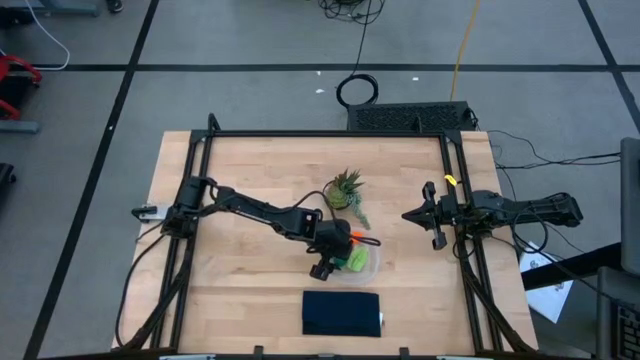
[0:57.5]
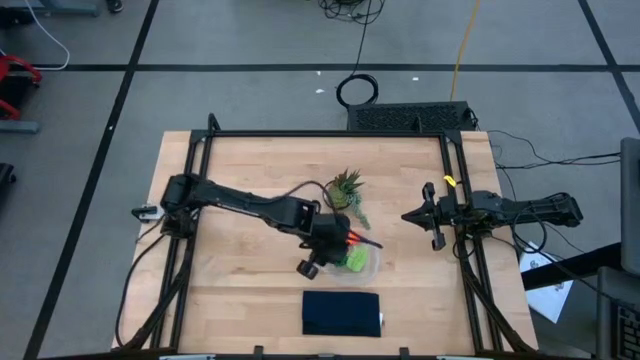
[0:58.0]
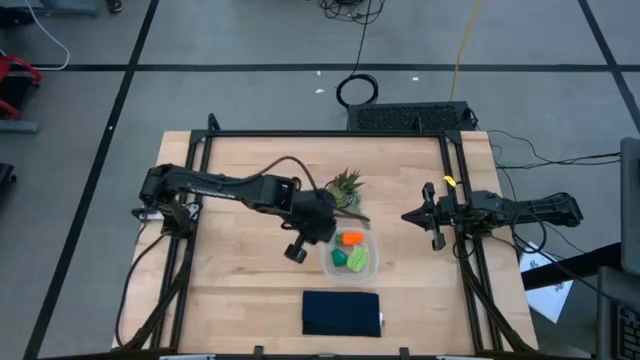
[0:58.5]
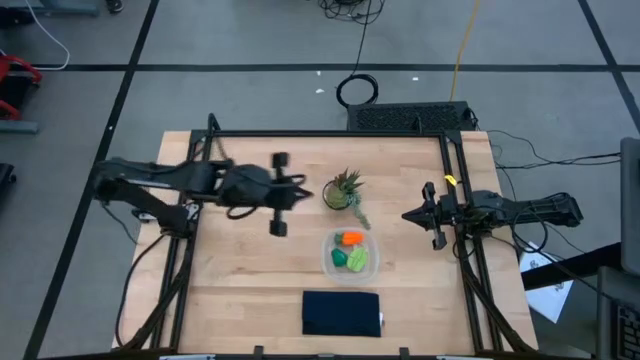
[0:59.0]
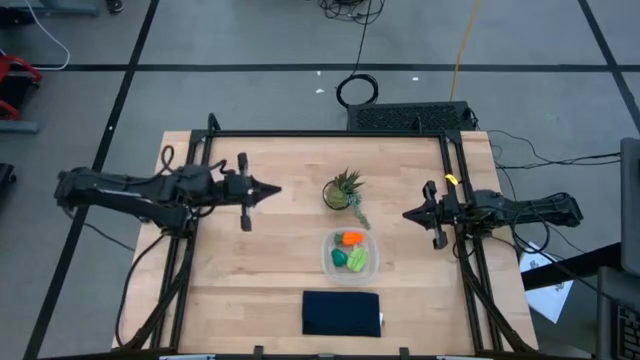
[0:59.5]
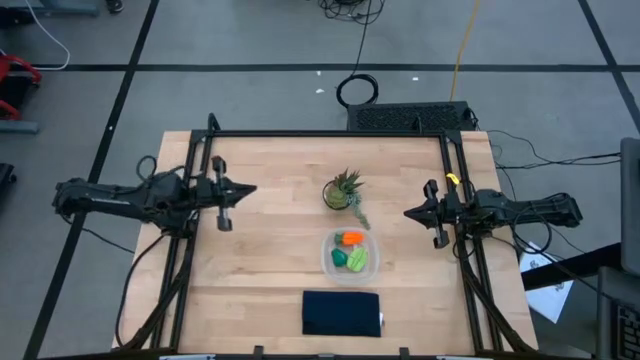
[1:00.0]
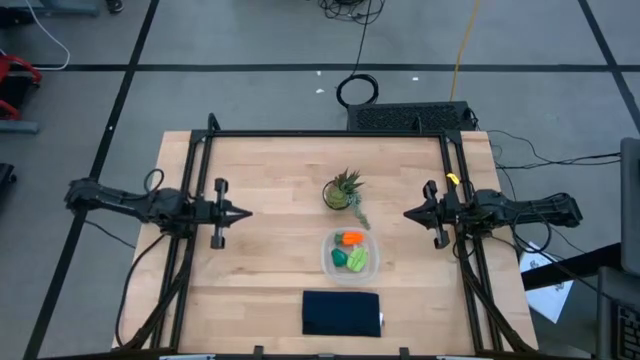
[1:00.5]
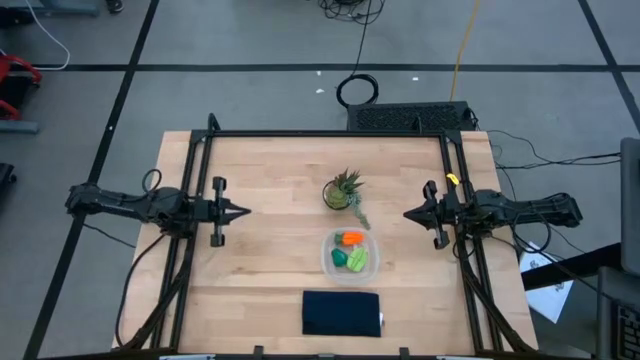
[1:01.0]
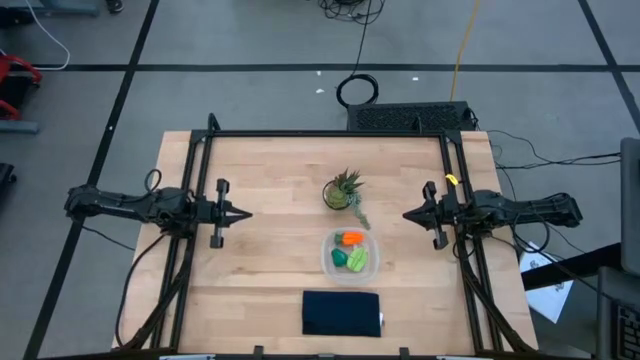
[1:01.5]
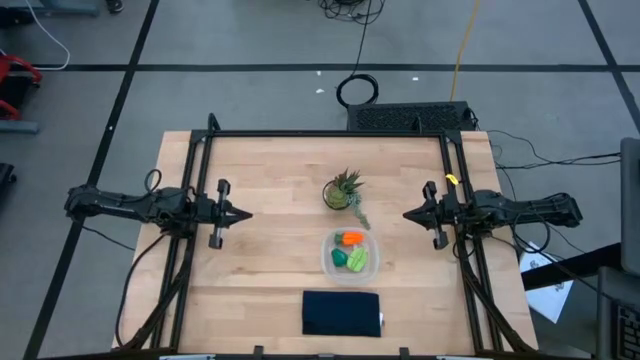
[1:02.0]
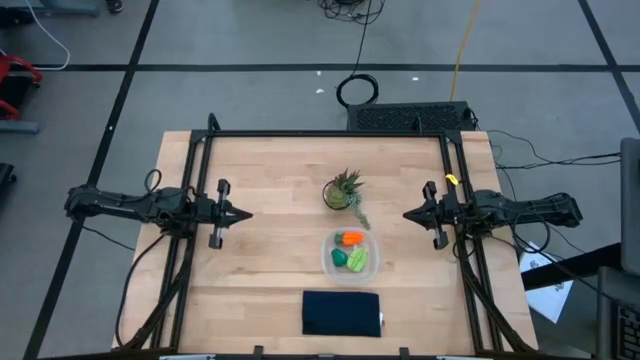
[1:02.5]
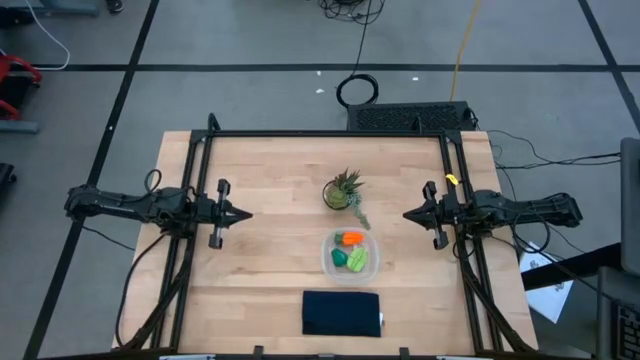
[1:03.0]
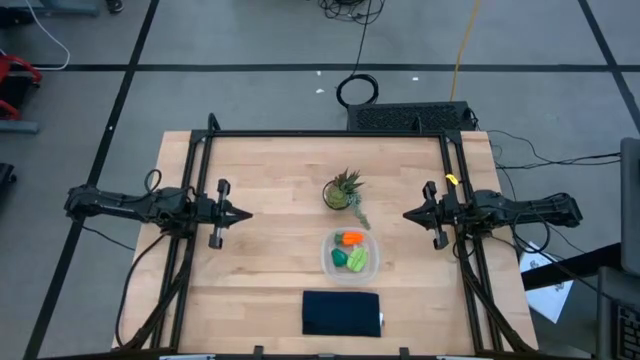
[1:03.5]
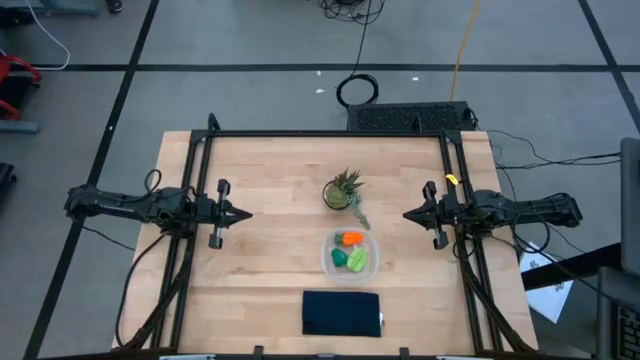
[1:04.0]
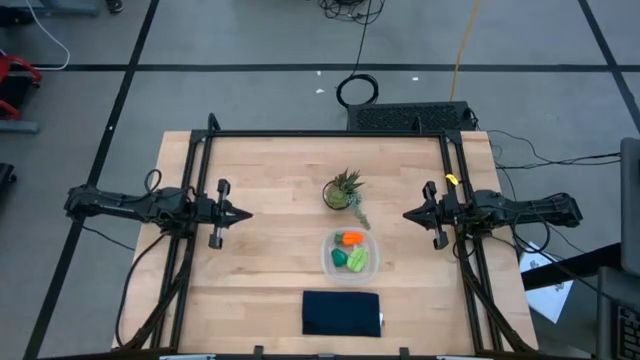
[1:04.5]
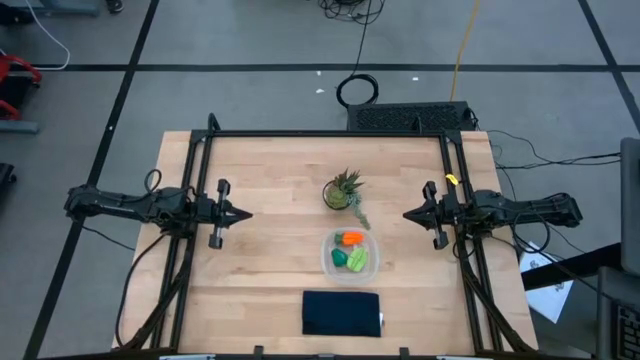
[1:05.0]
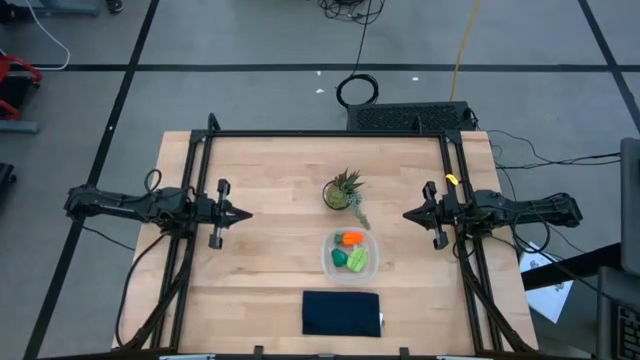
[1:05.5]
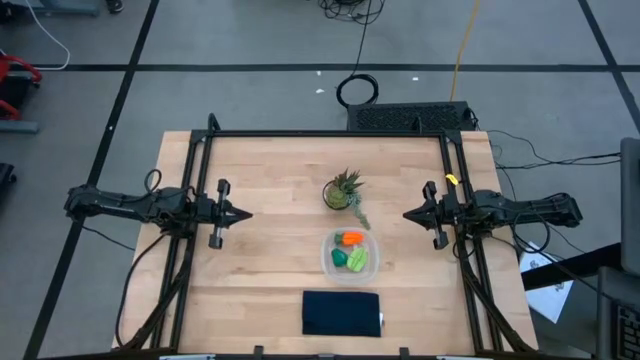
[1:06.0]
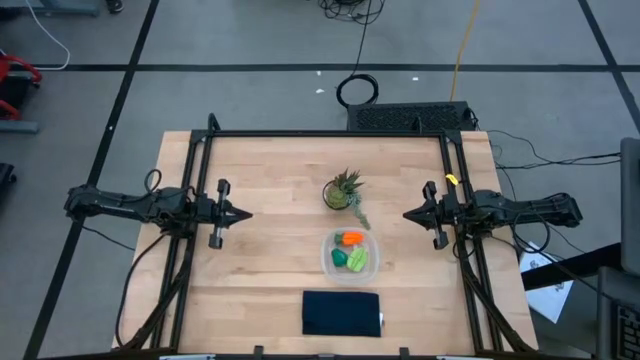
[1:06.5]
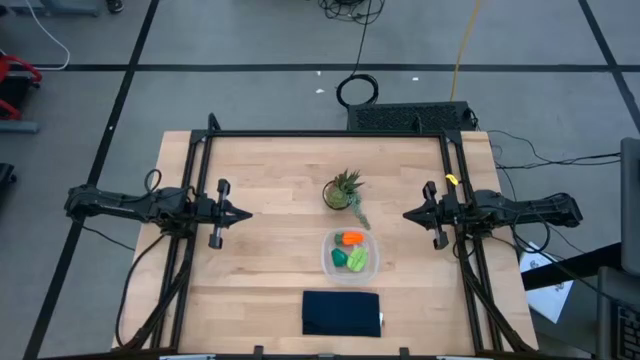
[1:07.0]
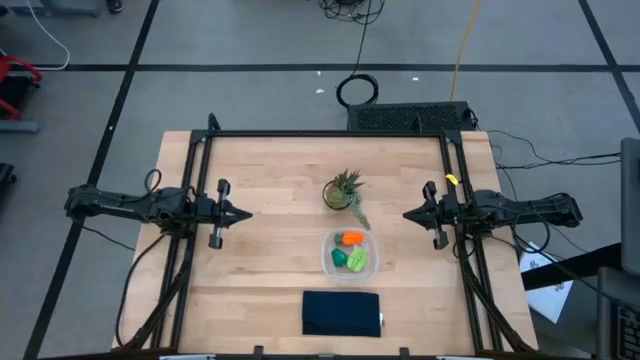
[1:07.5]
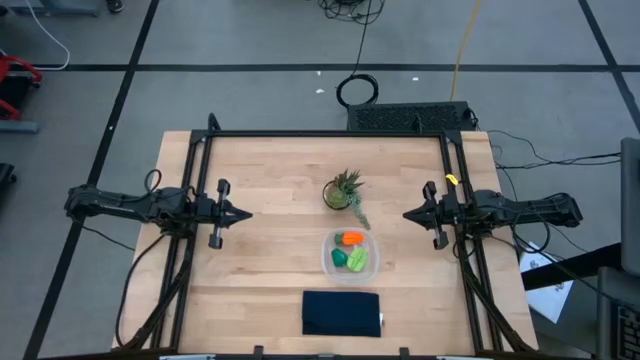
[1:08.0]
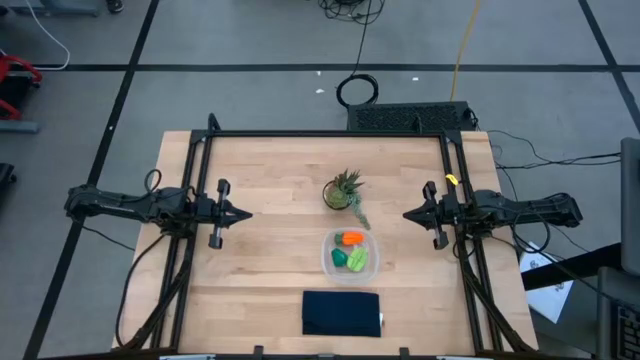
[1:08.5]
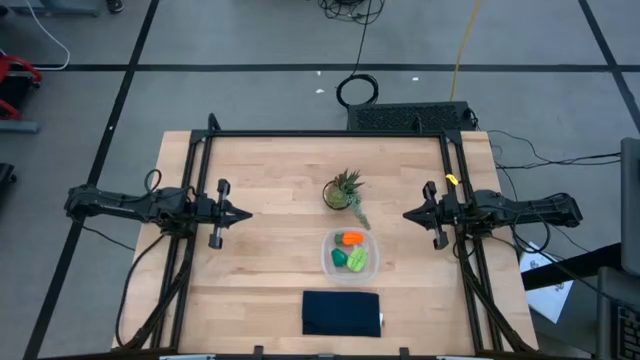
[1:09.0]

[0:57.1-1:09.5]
Task: Pick and placing Produce into tupperware
Return to Home Position

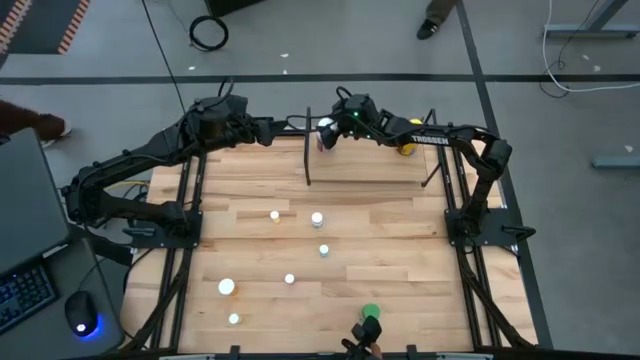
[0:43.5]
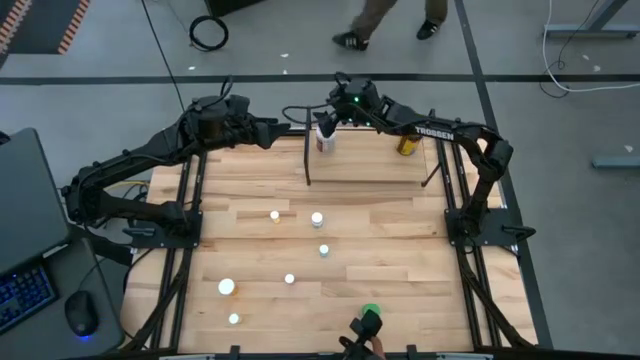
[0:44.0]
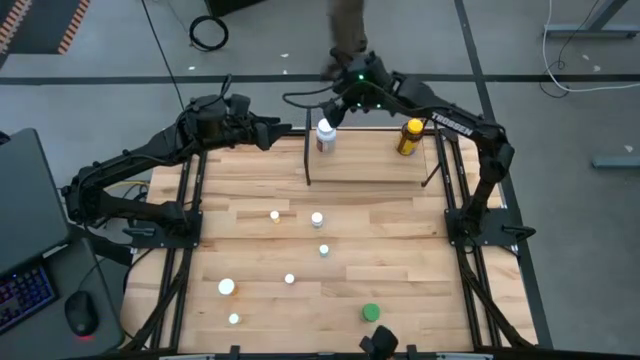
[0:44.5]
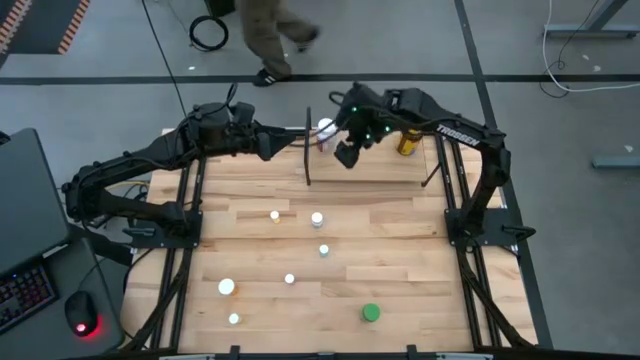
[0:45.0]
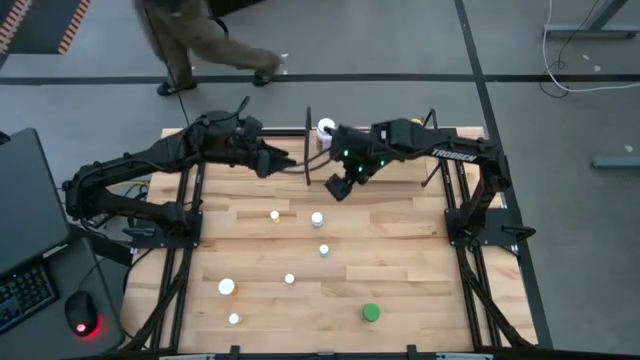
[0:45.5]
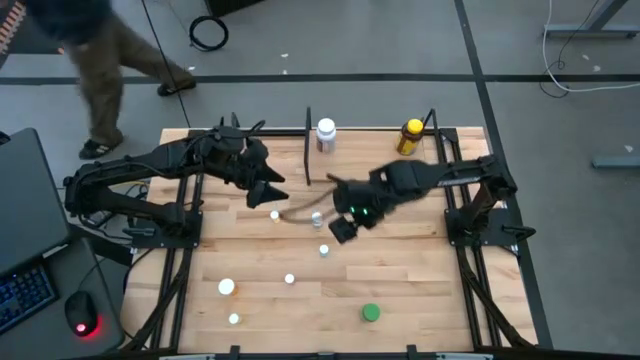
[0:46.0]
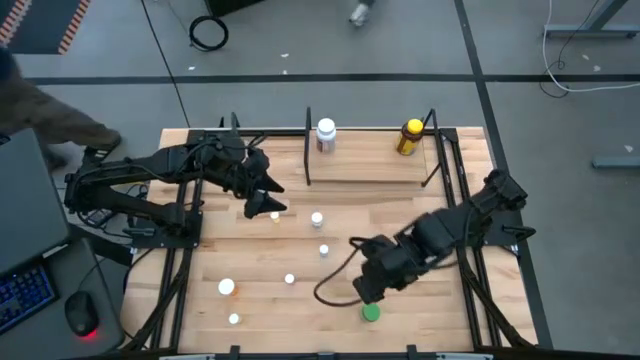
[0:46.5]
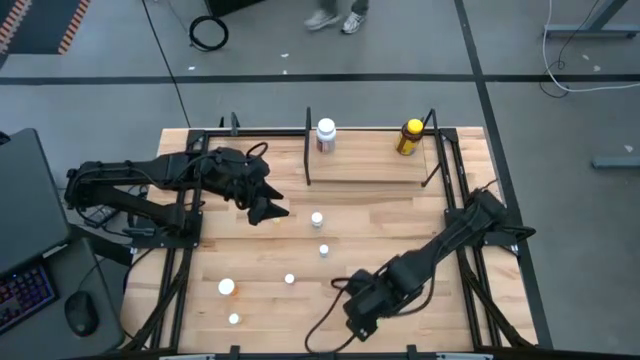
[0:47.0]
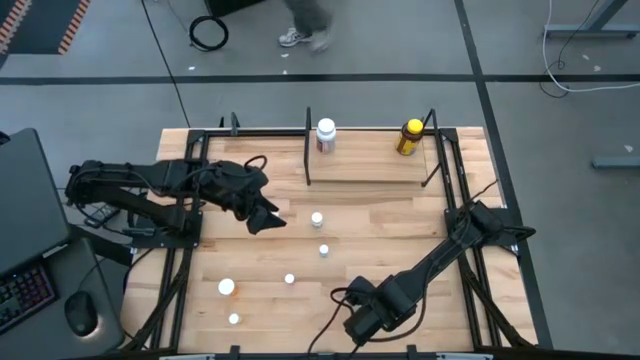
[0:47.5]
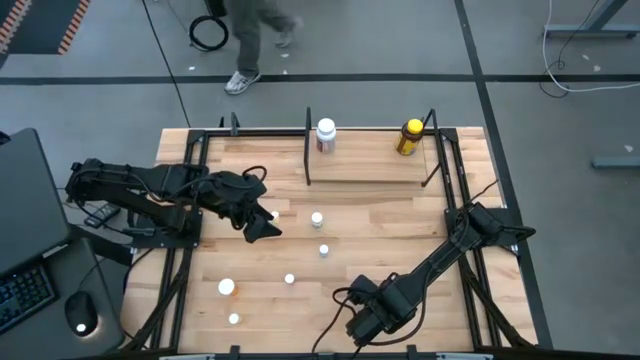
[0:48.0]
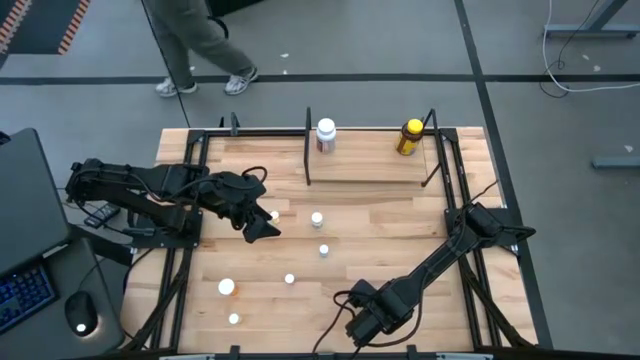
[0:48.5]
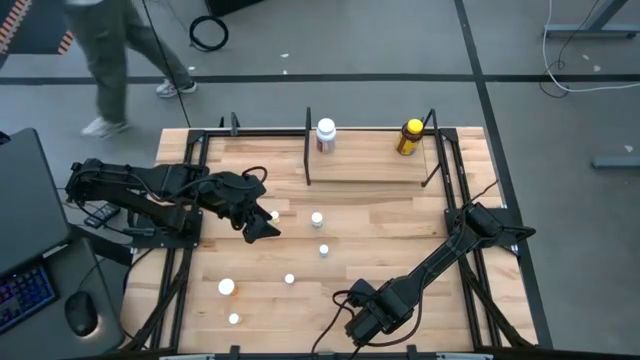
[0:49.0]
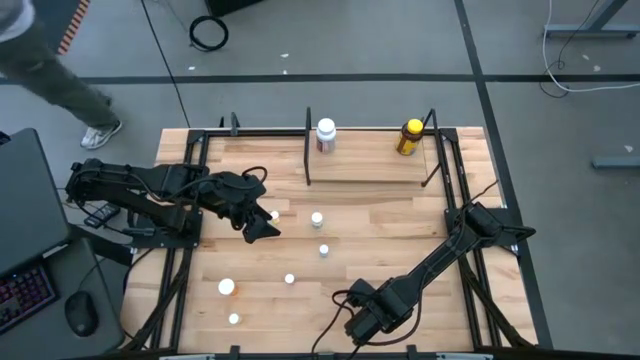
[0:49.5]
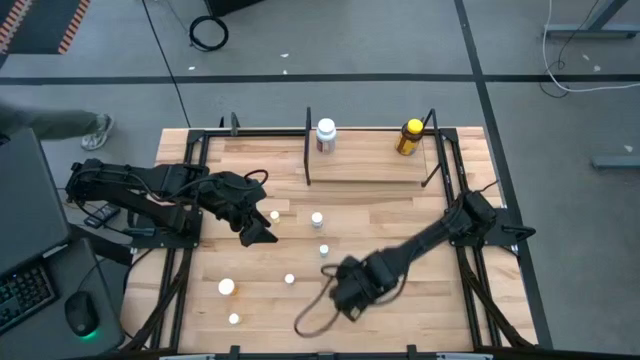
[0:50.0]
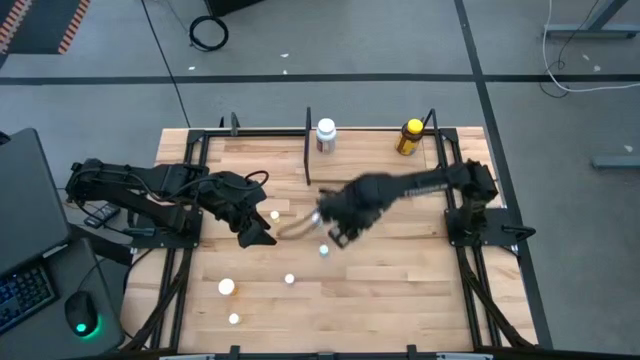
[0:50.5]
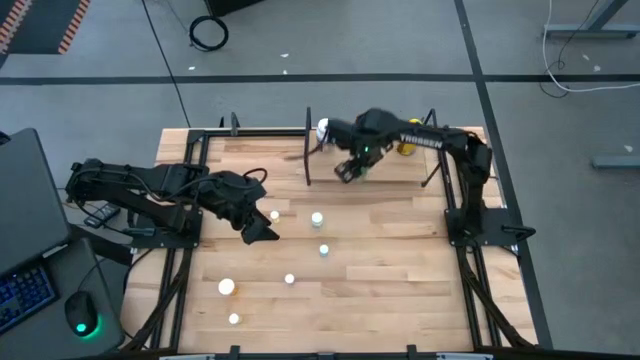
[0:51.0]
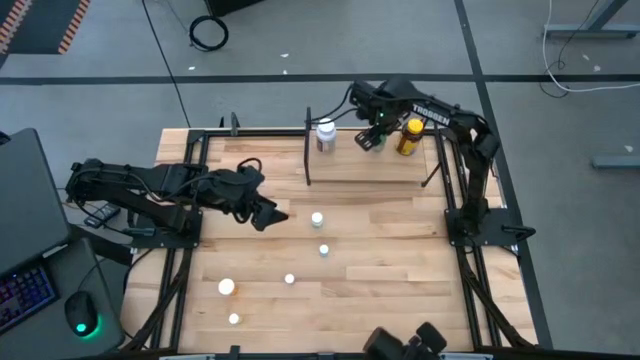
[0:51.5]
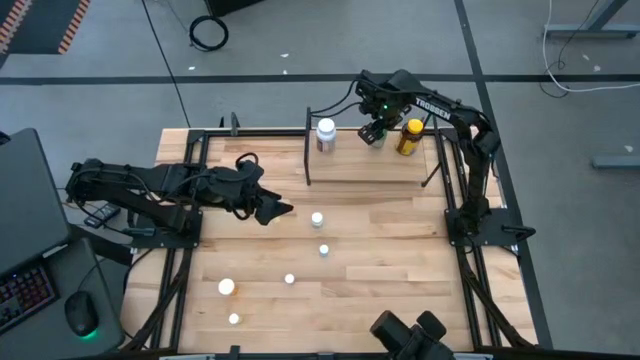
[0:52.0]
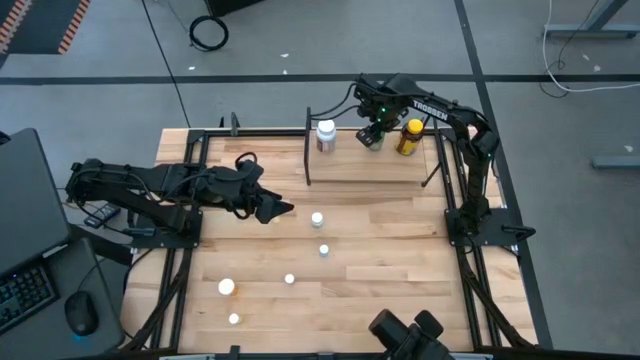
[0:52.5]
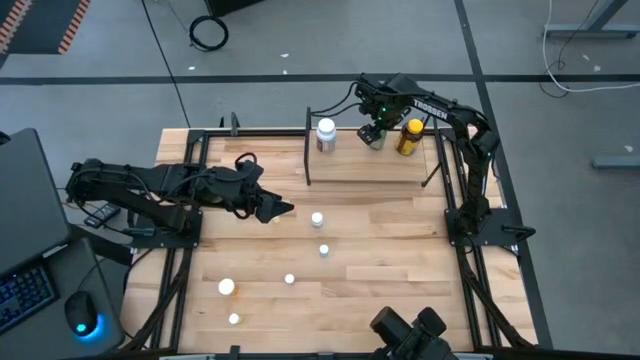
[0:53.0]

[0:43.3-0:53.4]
Task: Pick and place medicine bottles onto shelf by color
Put the green pill bottle on the shelf
